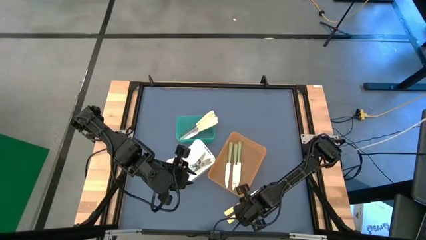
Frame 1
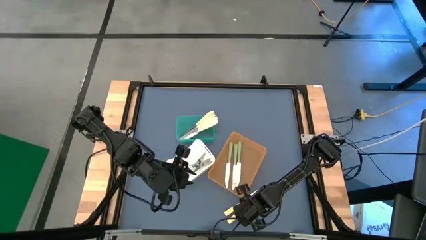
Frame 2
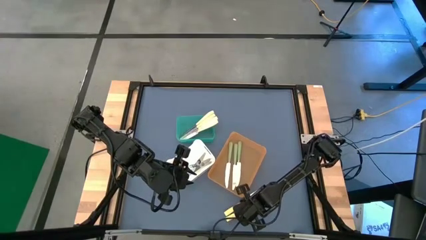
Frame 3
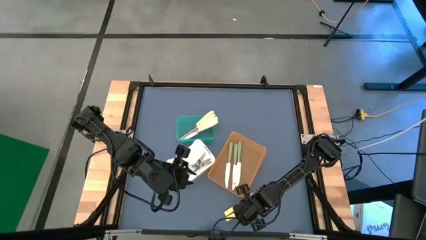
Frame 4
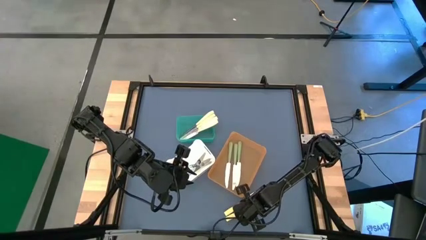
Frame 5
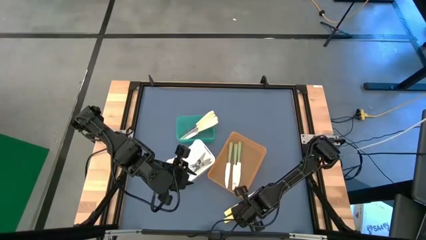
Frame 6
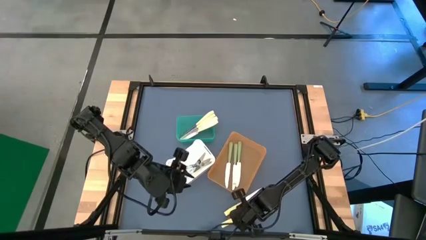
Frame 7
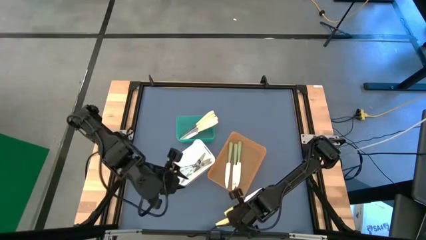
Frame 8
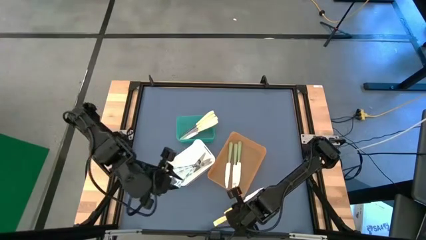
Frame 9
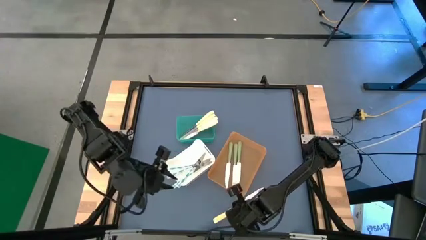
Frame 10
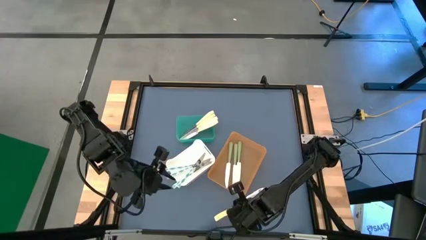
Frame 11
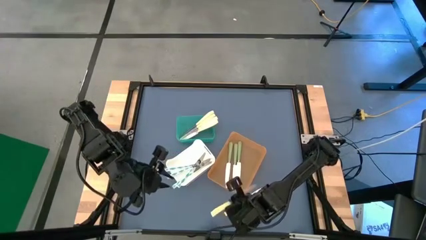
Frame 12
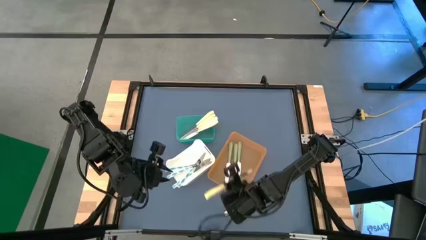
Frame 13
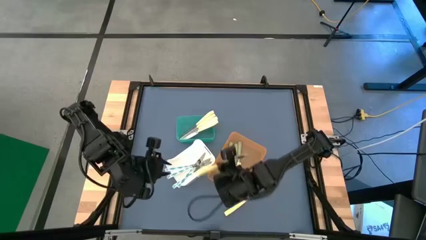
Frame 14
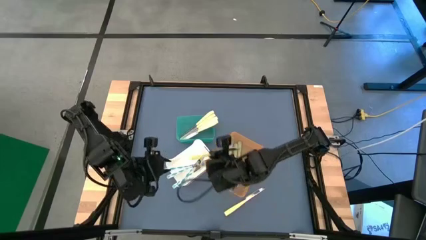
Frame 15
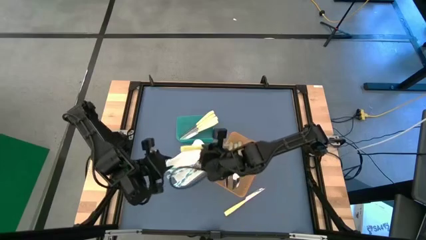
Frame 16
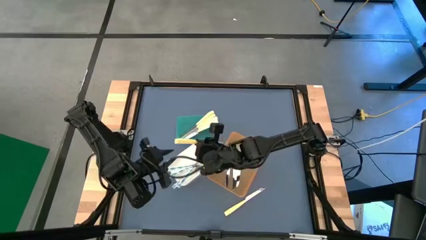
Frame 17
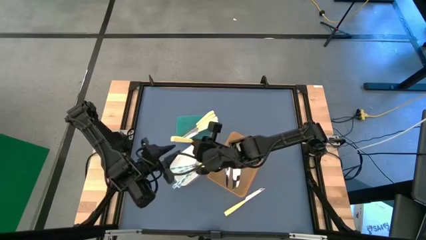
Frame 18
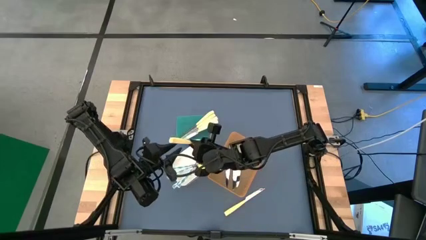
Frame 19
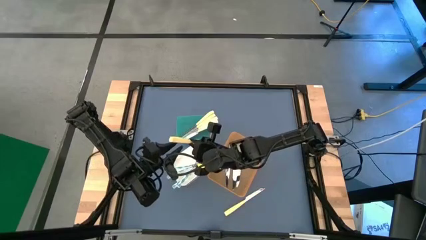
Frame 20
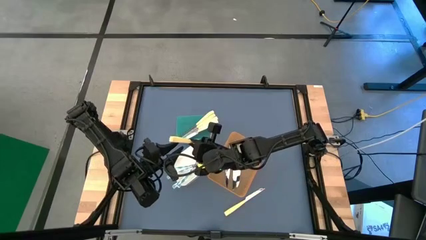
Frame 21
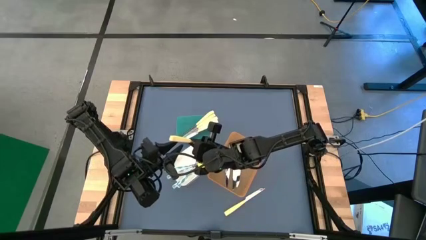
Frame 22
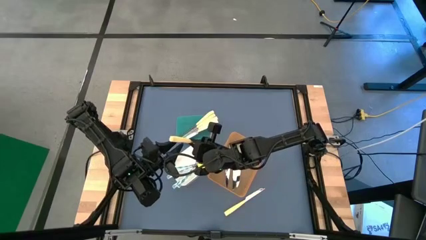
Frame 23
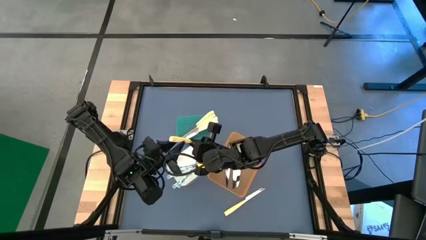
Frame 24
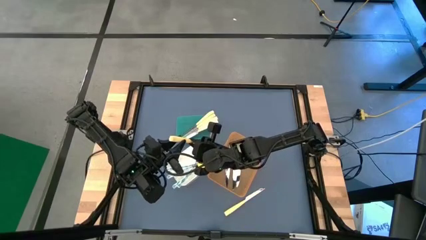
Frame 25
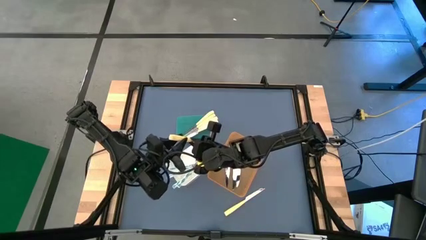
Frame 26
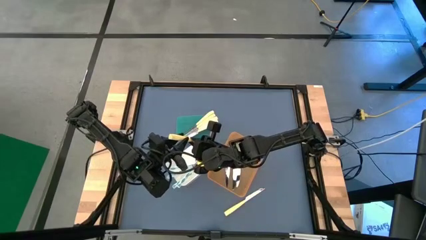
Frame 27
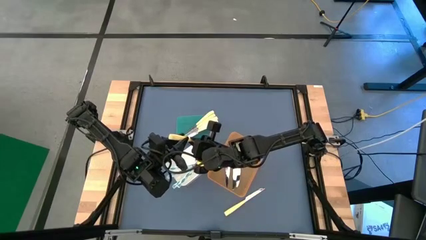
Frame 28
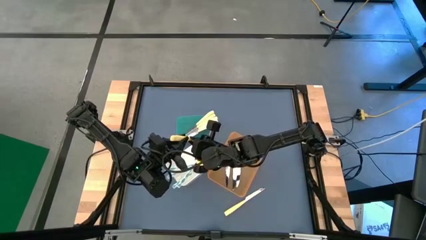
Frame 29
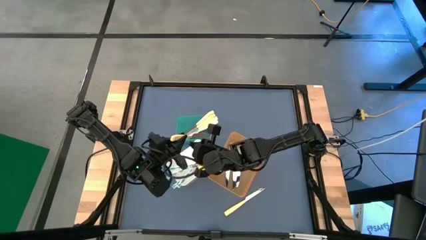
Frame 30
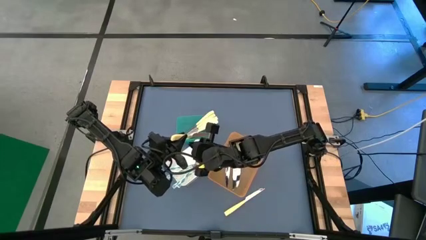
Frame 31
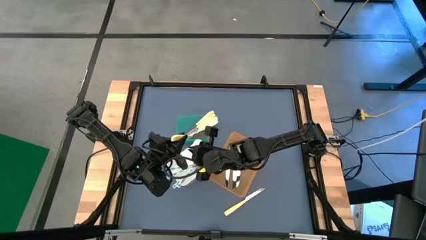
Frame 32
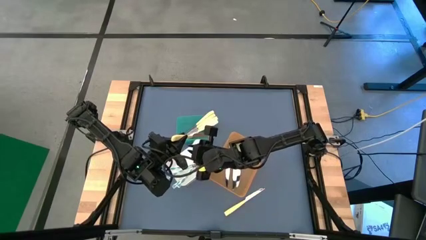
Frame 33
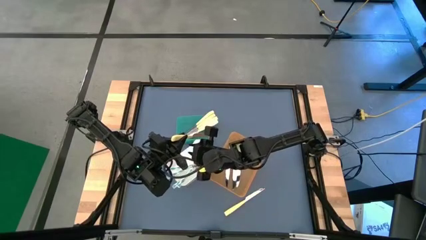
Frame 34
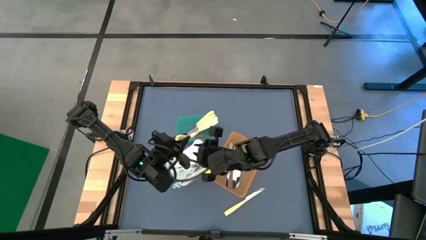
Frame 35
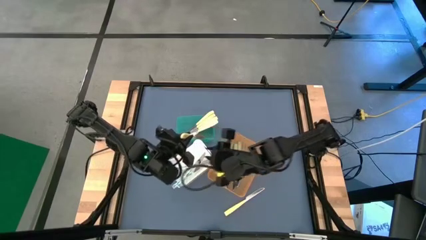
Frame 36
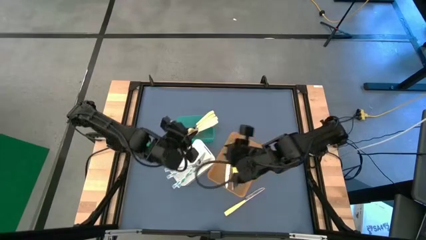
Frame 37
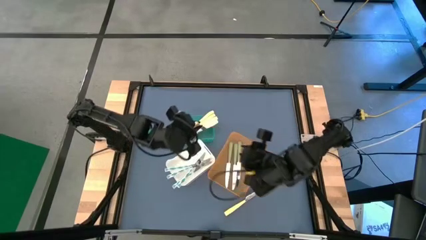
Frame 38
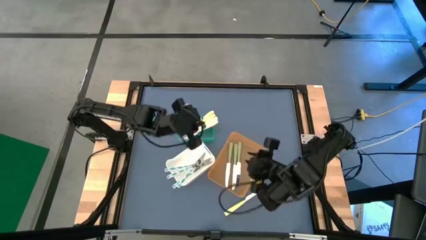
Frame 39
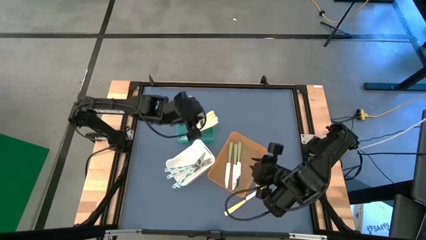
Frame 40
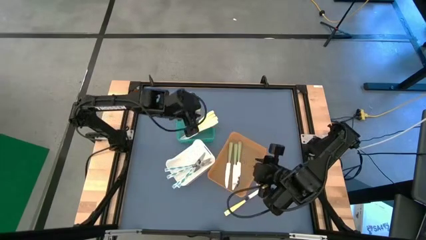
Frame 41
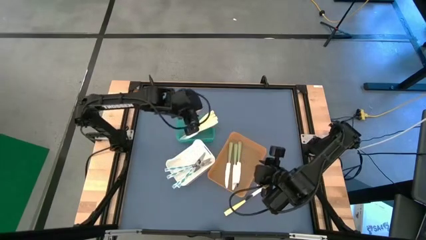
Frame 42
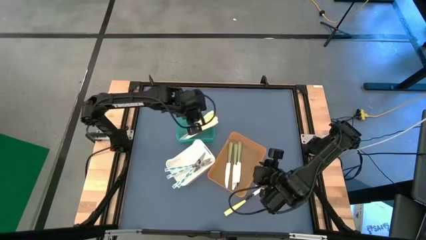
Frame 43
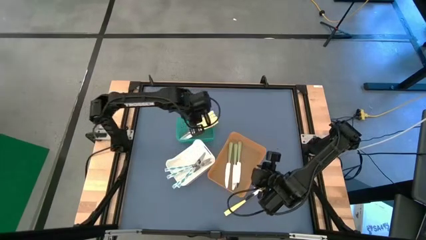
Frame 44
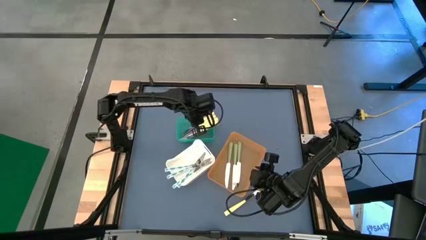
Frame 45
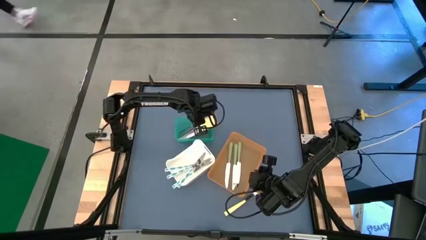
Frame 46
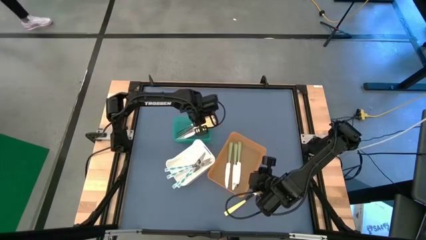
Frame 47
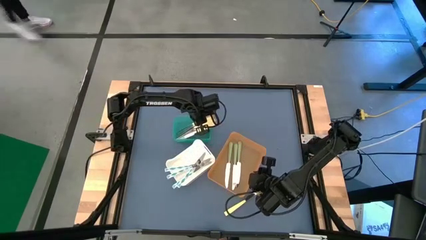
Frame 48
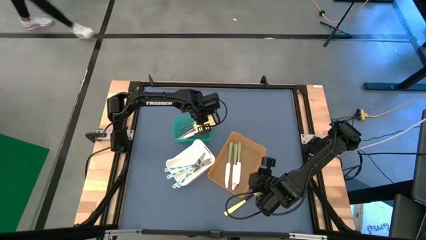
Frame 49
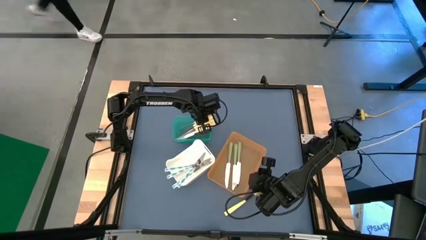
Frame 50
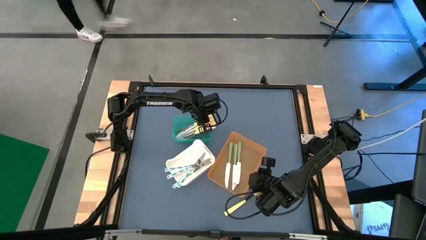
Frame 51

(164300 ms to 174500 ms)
Task: Sort silverware by color (type)
Put the yellow knife into the blue bin
